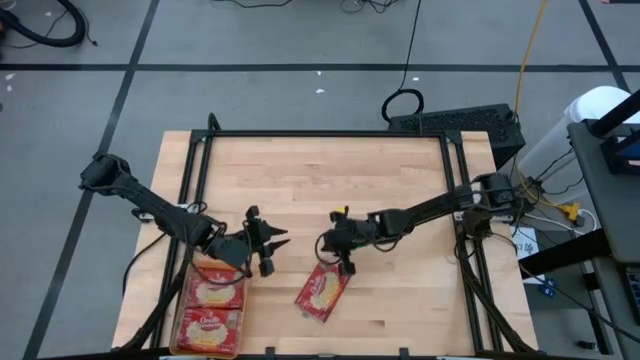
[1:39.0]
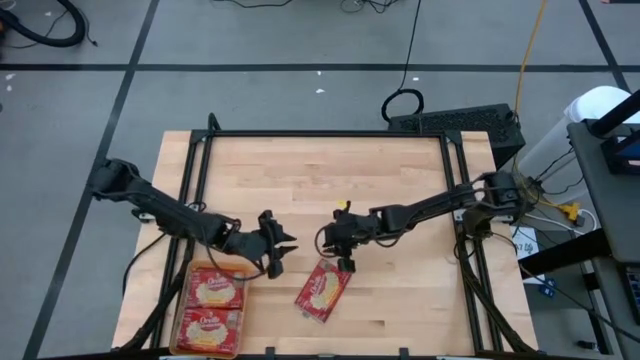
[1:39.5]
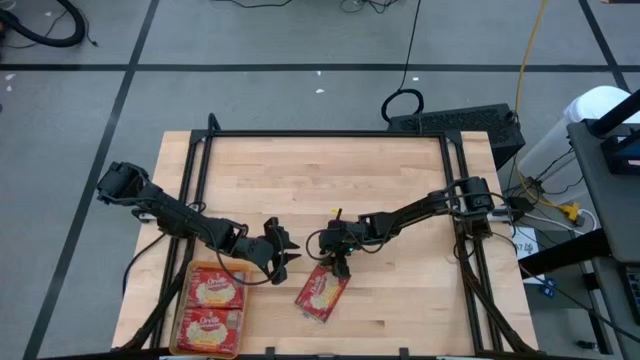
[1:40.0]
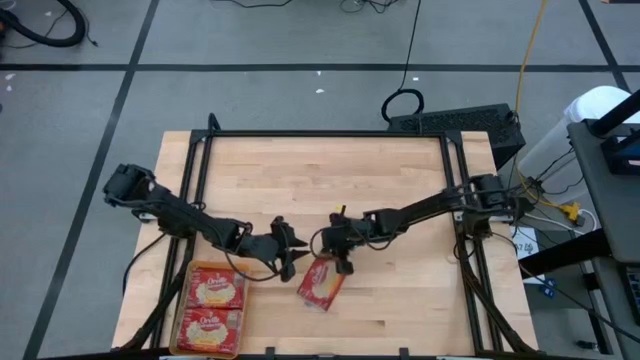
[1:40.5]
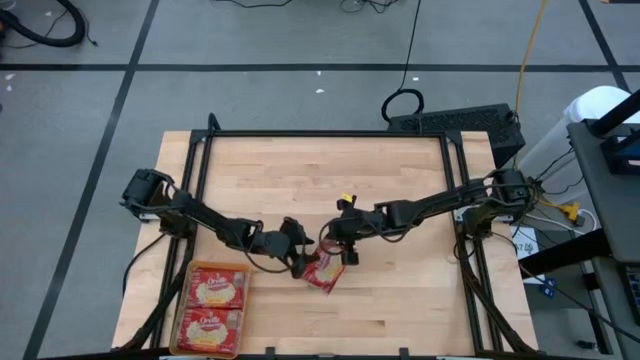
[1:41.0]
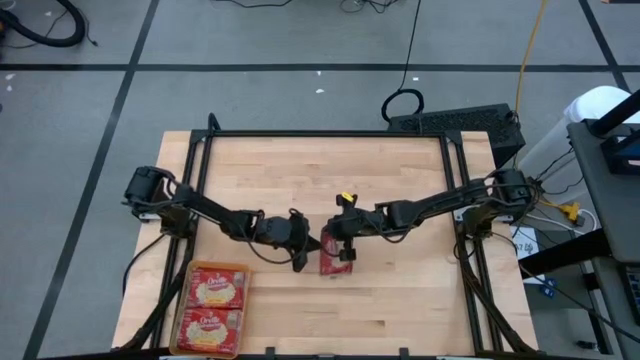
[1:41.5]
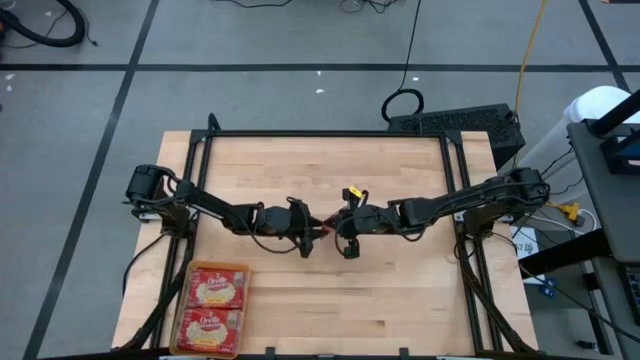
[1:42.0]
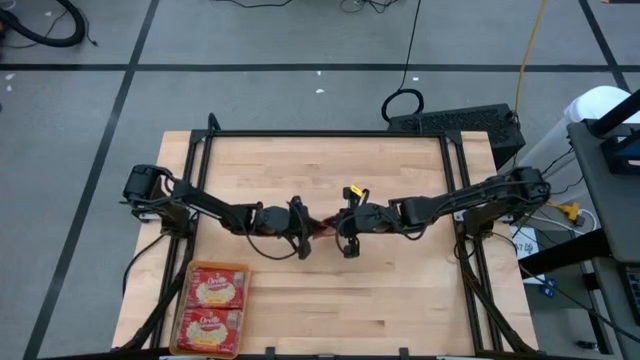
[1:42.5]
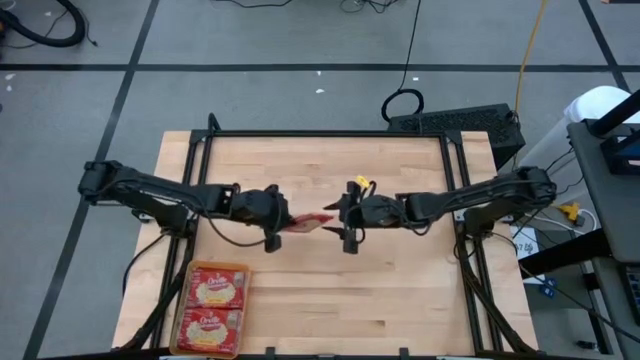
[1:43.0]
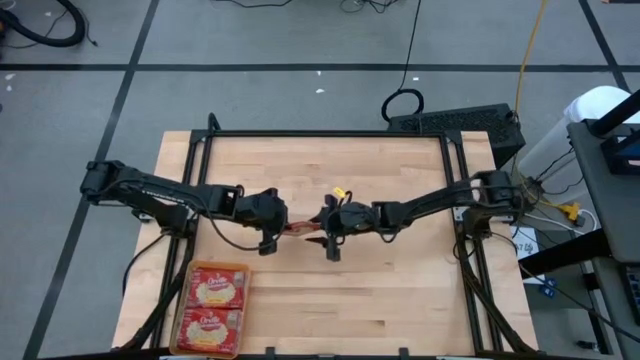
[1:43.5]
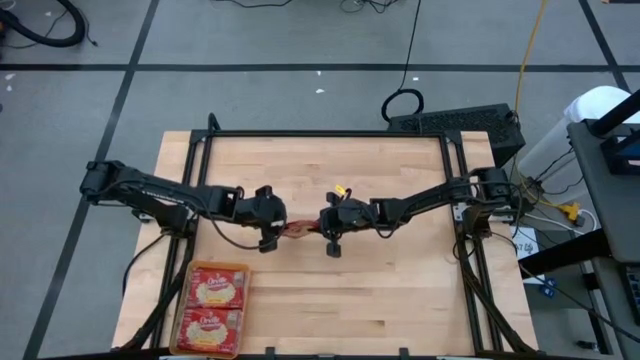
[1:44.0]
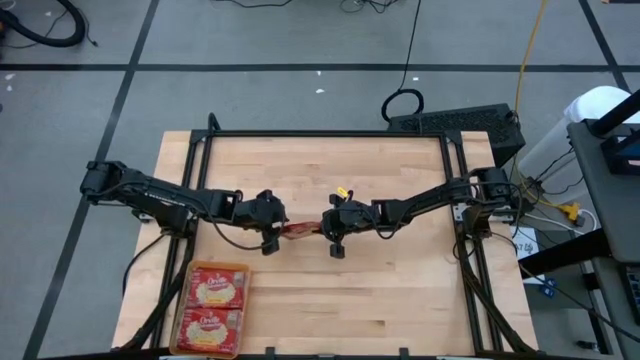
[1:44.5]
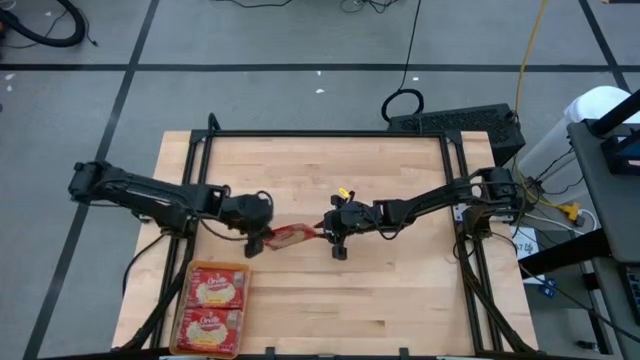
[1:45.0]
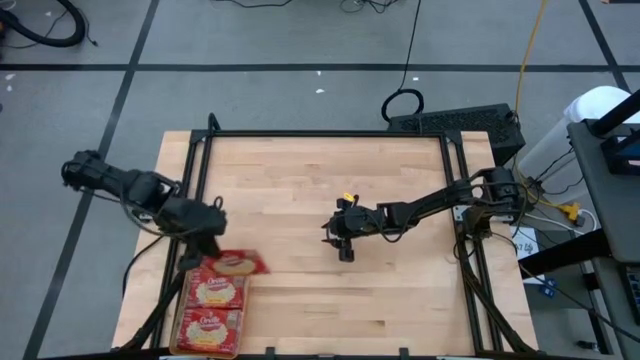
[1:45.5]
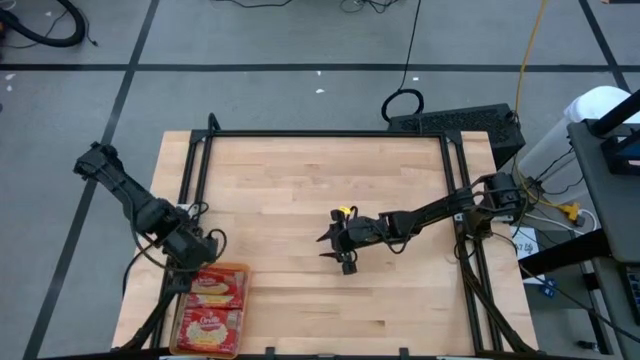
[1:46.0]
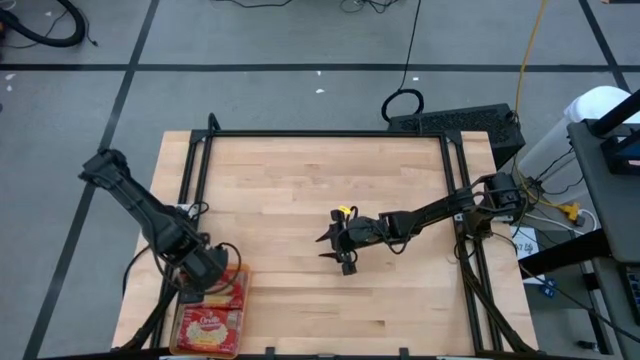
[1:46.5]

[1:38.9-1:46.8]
Task: Sort popcorn bags into baskets
Put the red popcorn bag into the orange bin

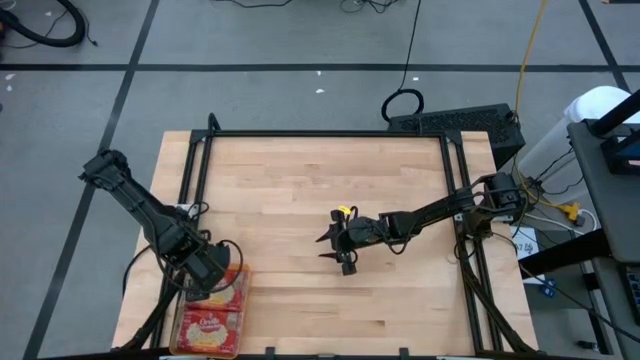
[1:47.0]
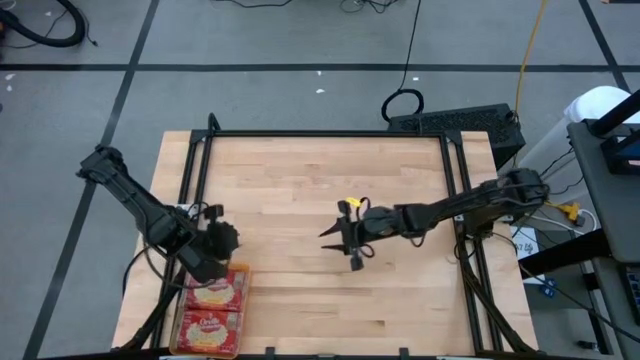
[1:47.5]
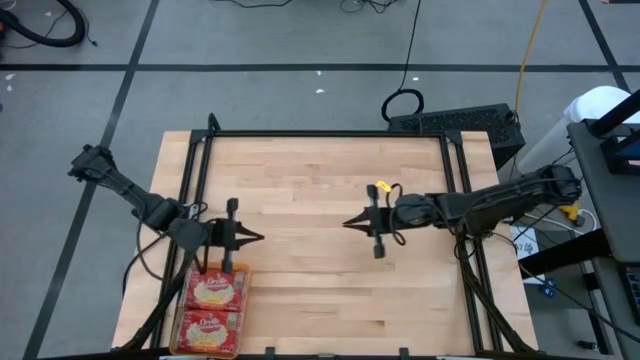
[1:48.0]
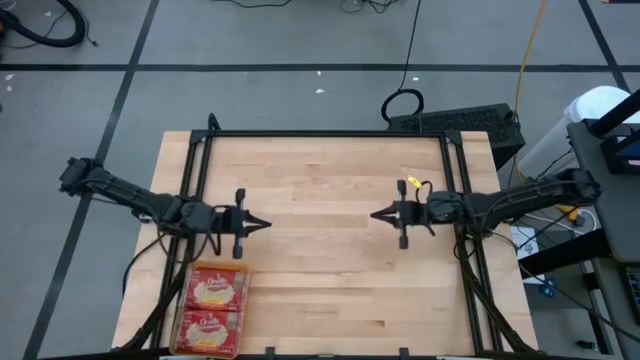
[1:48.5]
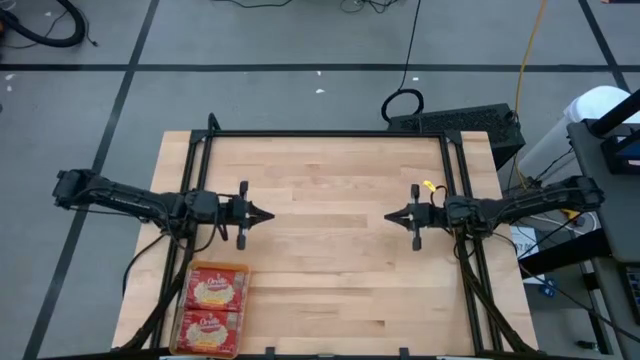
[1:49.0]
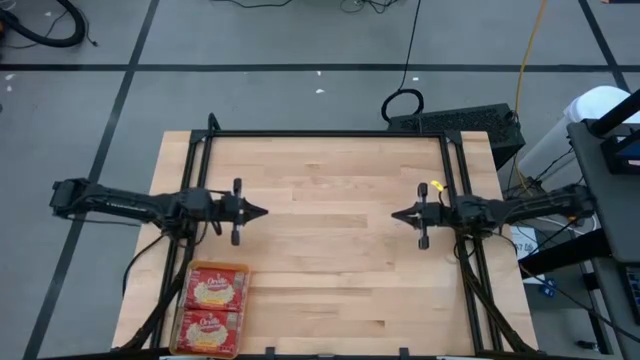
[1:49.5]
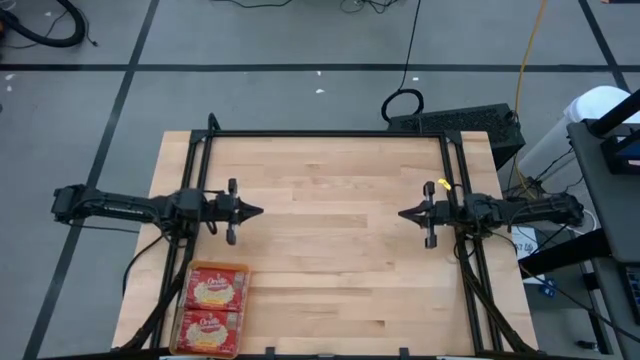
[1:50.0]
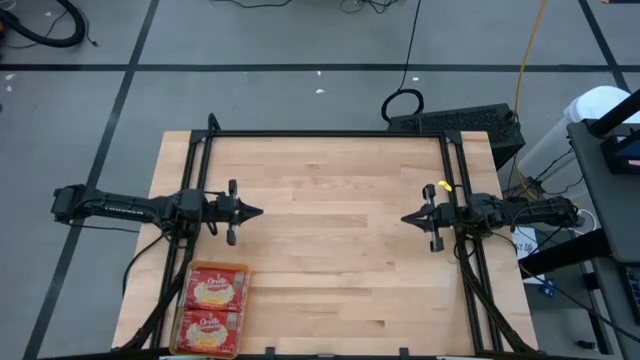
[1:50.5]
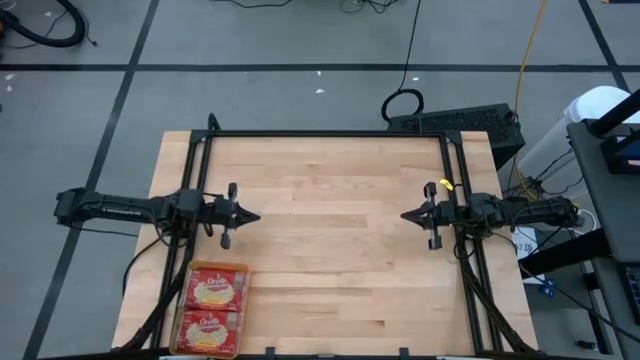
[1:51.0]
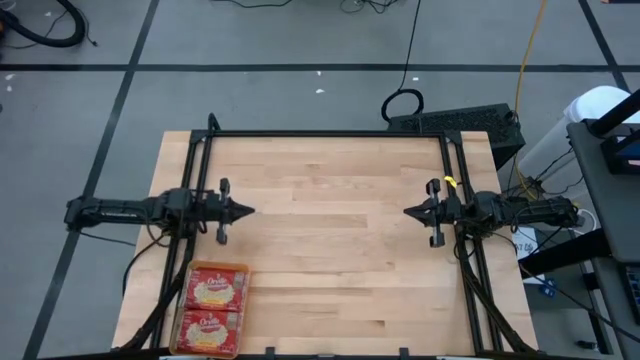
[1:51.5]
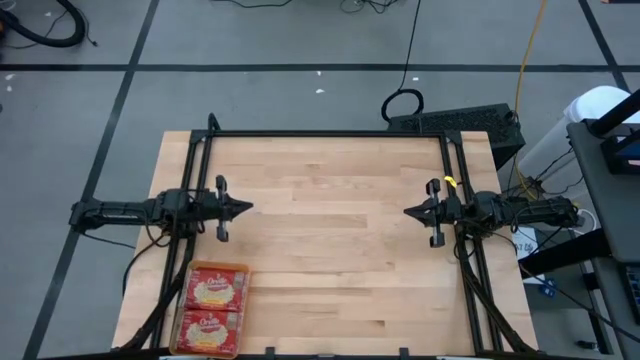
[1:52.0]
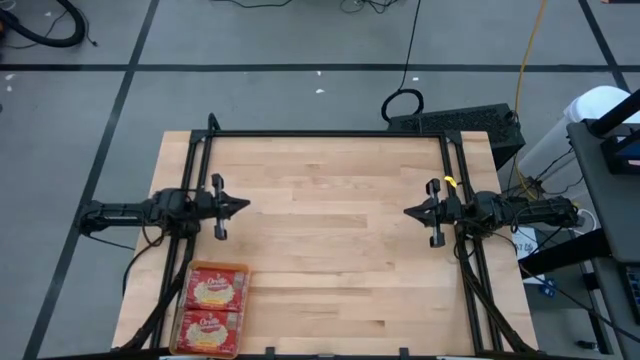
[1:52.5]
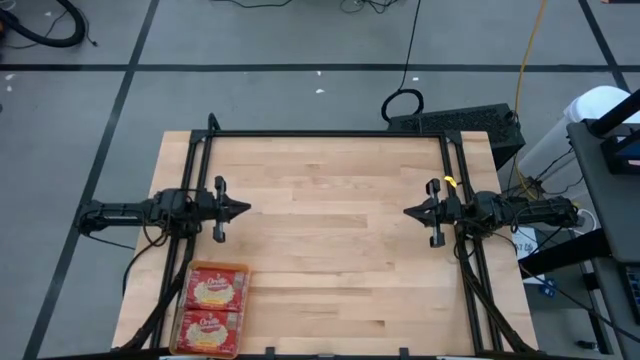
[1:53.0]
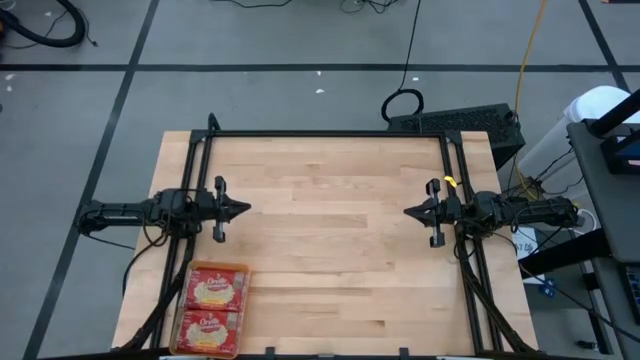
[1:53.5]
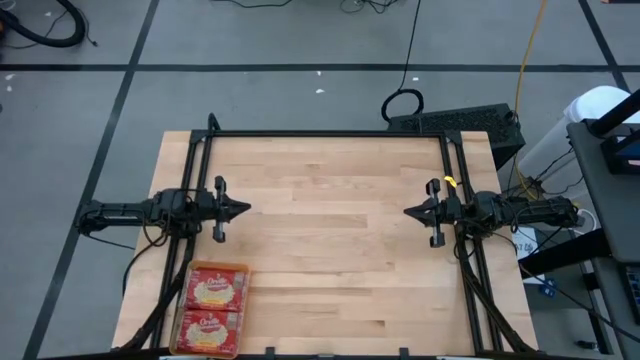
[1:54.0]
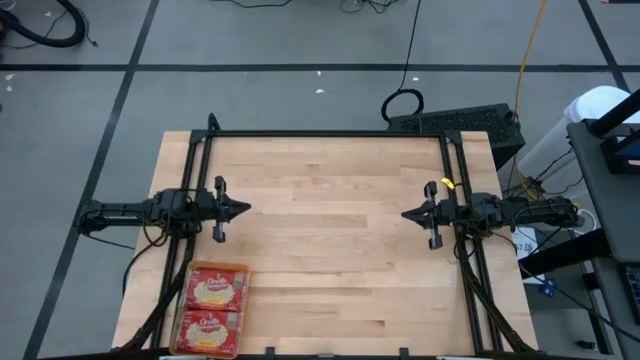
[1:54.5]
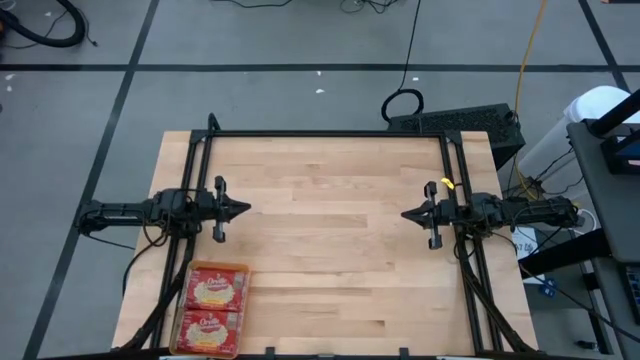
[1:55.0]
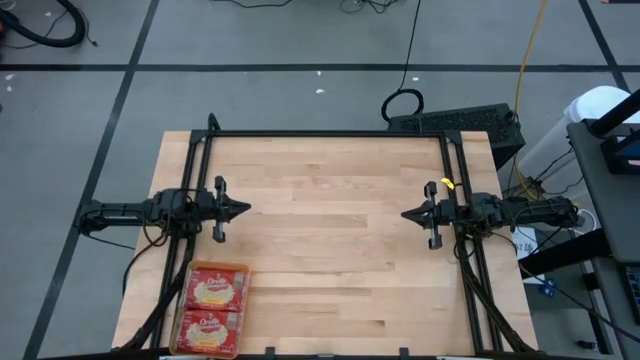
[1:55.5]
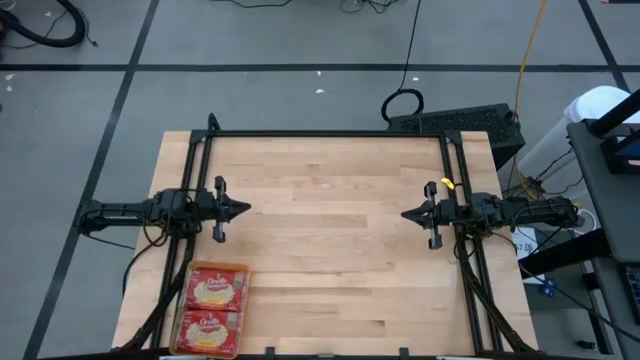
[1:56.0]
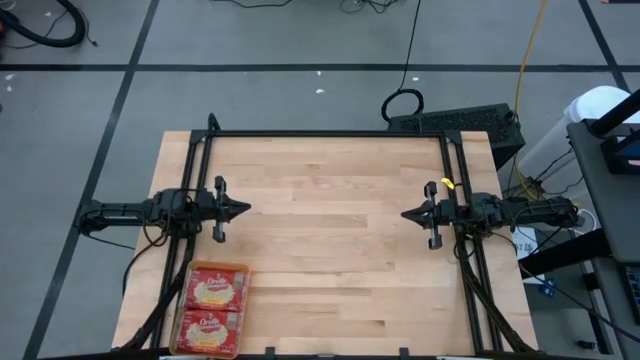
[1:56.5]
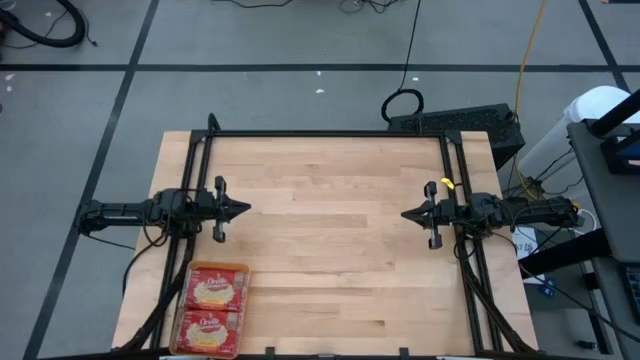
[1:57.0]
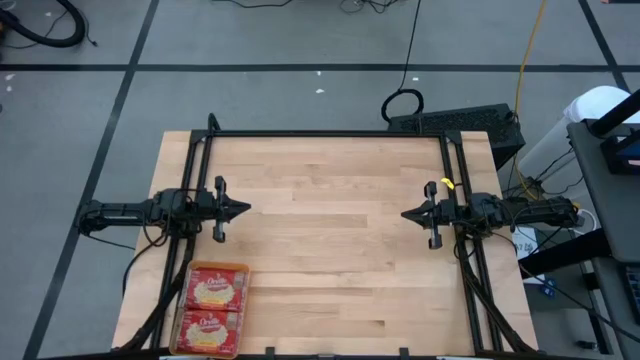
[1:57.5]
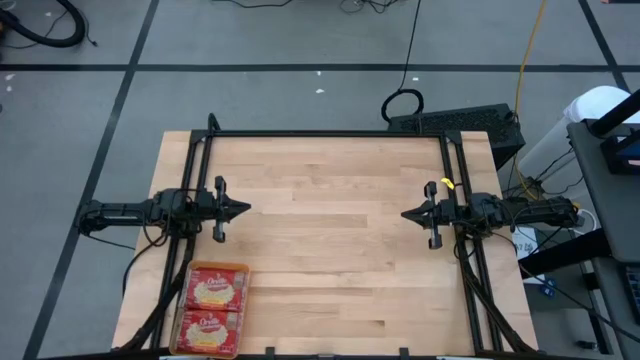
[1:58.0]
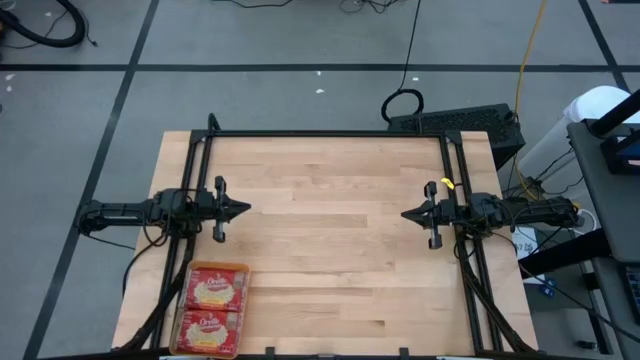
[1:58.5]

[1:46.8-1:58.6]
Return to Home Position

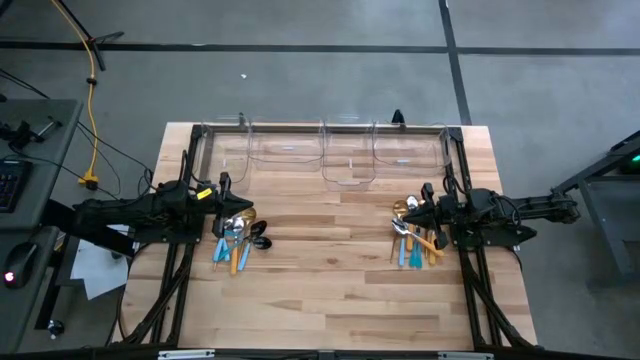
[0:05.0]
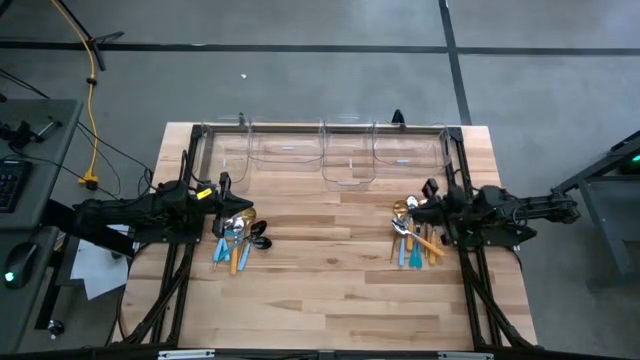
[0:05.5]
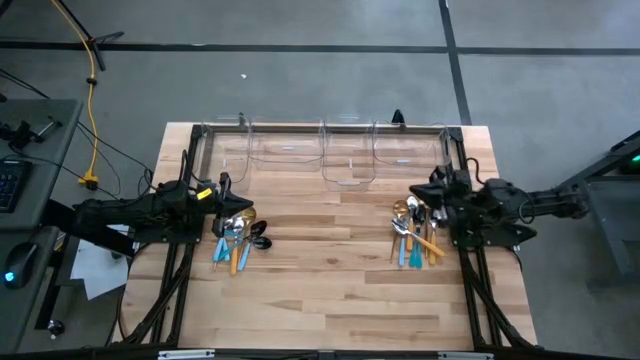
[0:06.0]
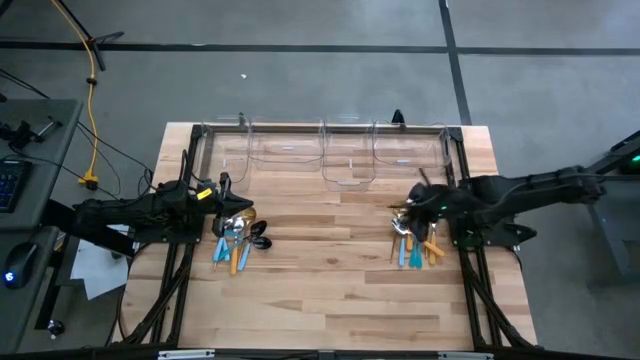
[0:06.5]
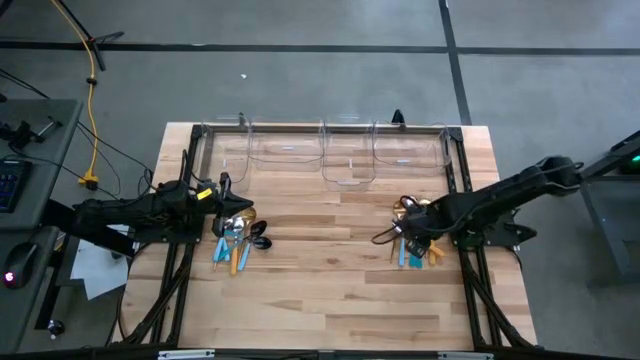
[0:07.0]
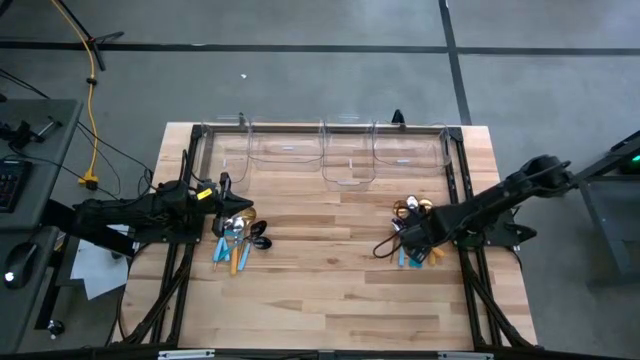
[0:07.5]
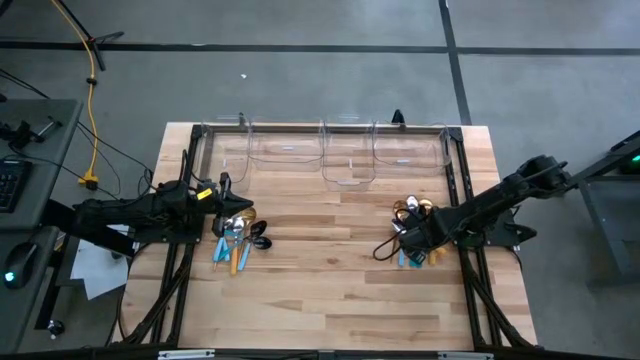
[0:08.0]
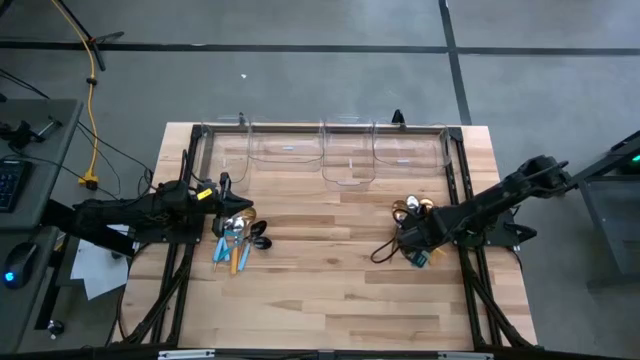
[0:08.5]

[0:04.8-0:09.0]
Task: Sort silverware by color (type)
Put the yellow spoon into the left transparent bin
